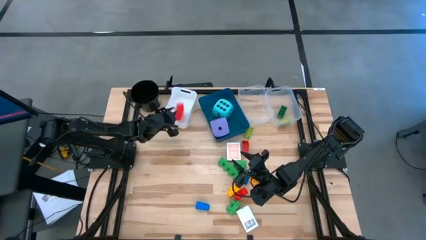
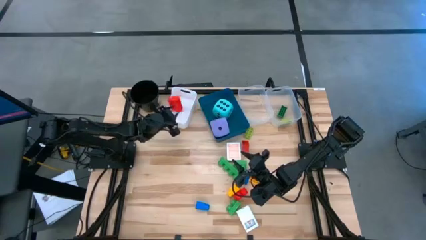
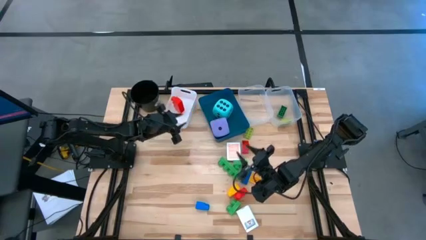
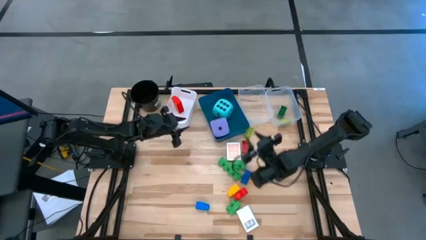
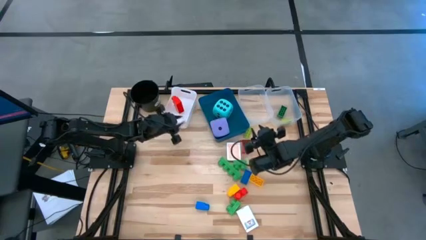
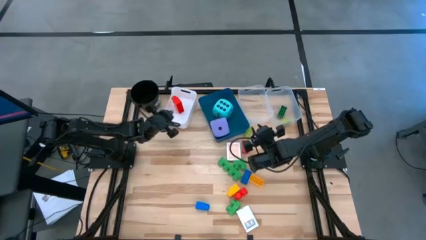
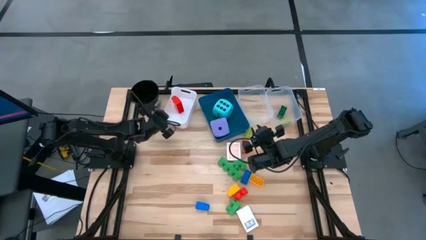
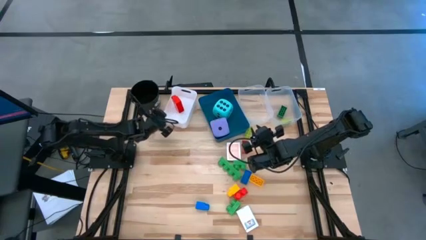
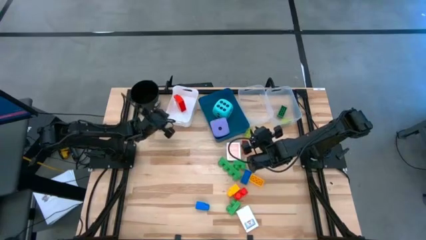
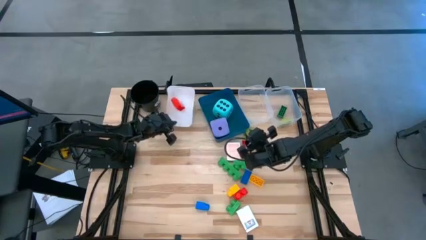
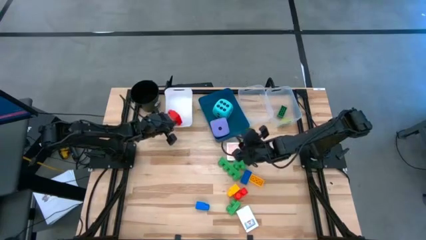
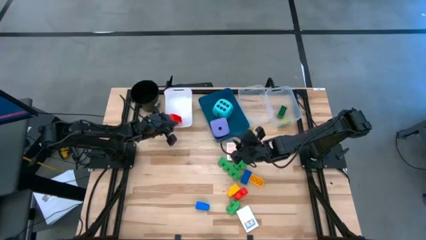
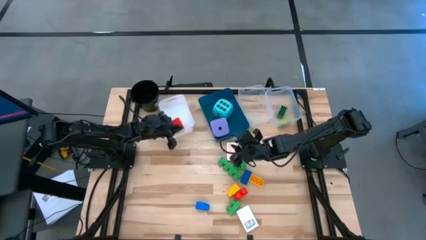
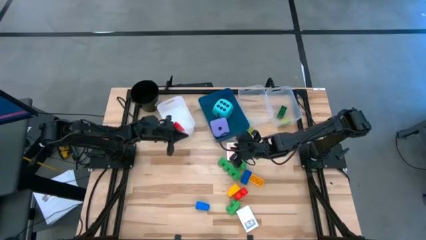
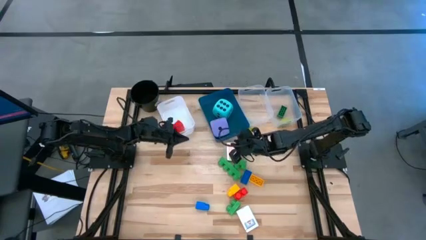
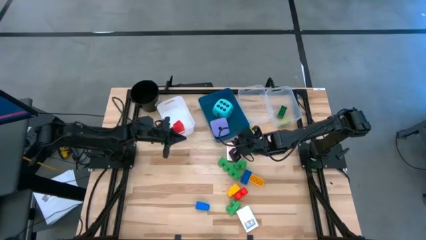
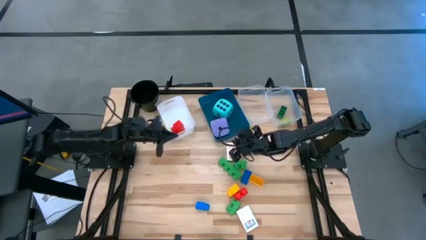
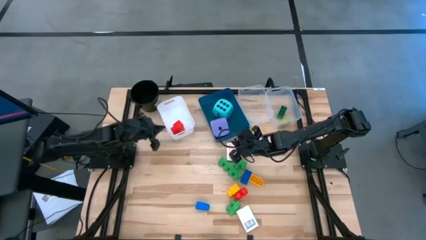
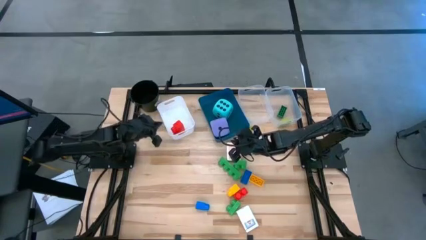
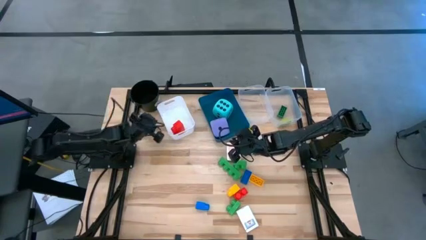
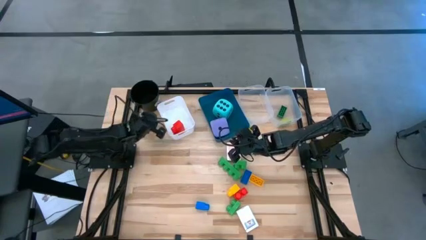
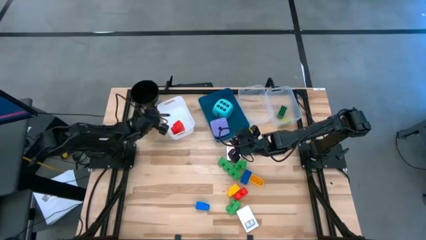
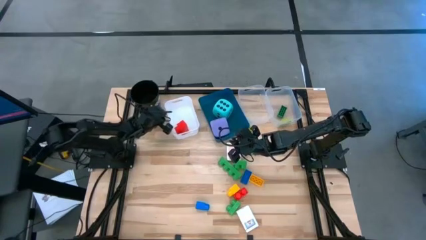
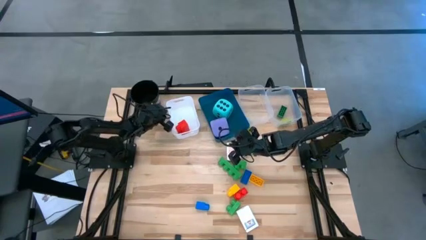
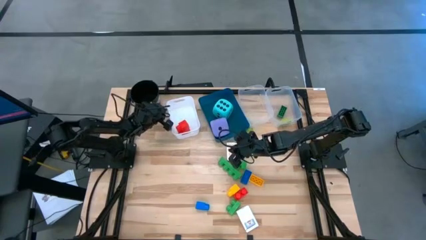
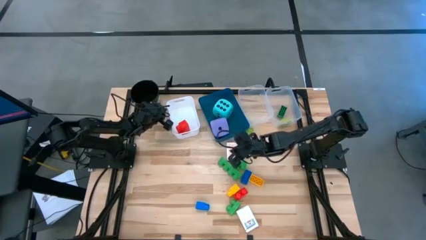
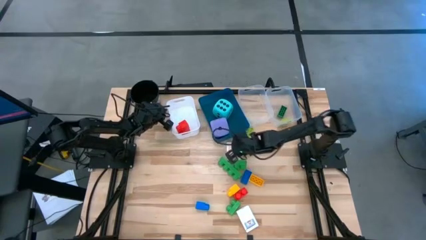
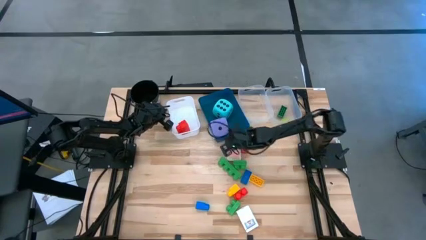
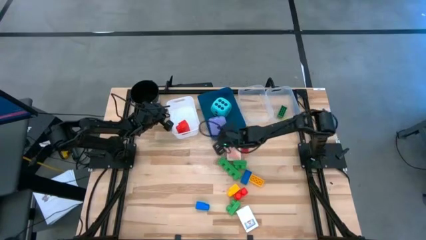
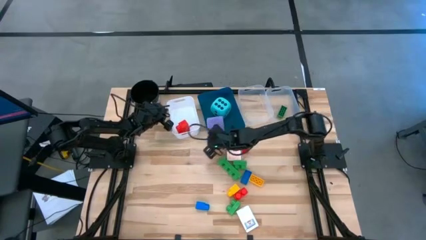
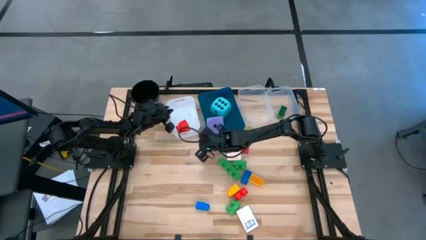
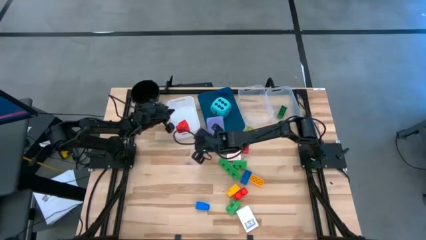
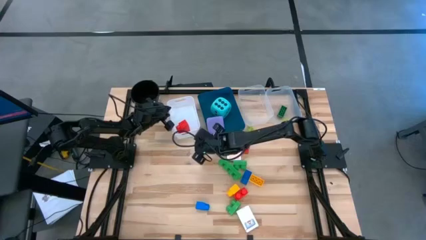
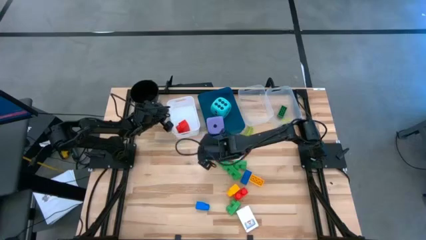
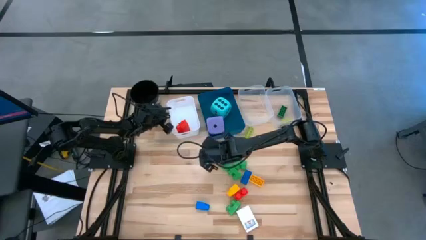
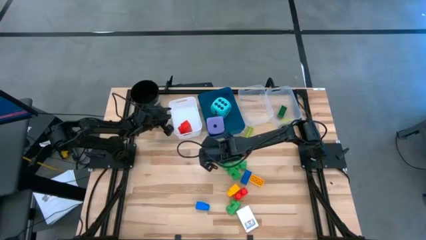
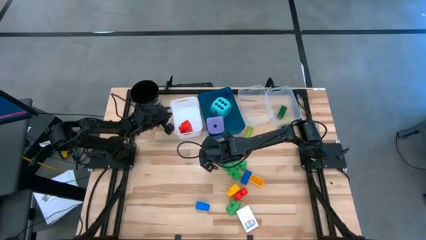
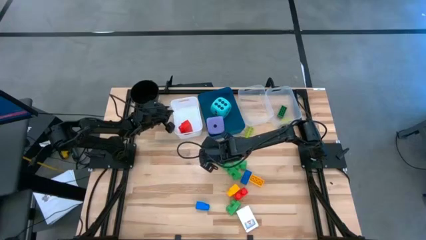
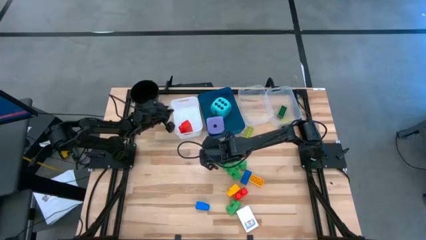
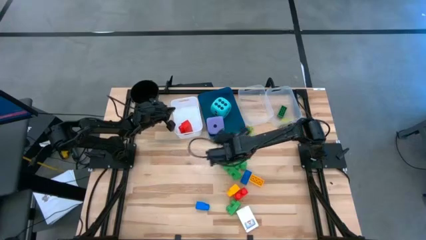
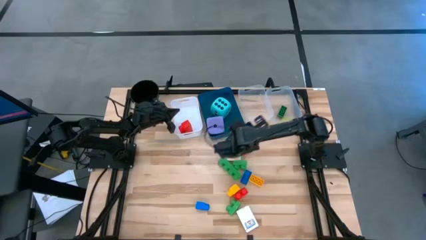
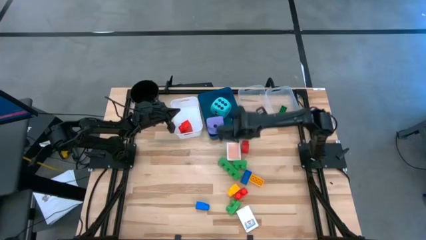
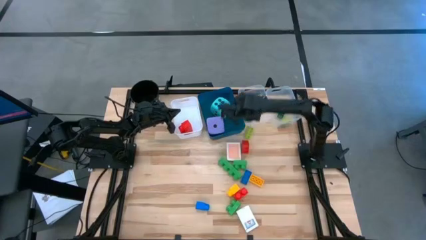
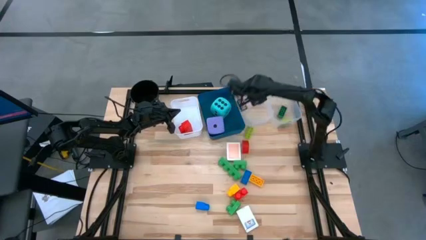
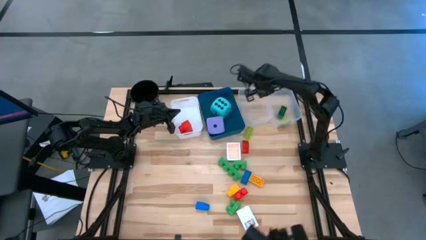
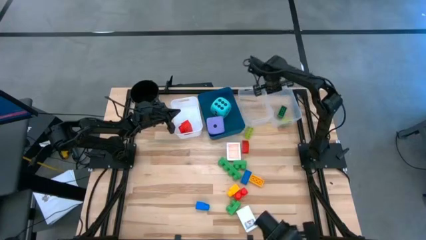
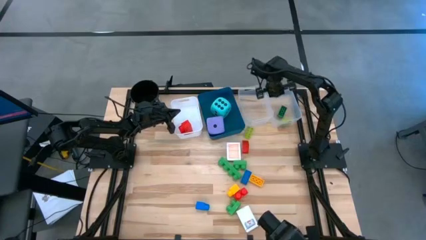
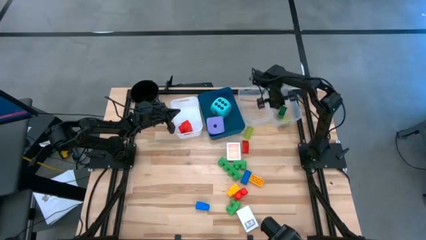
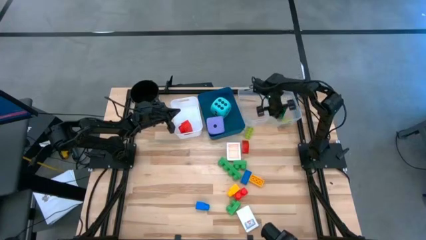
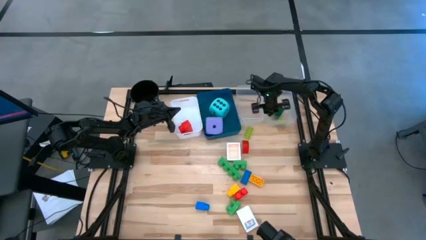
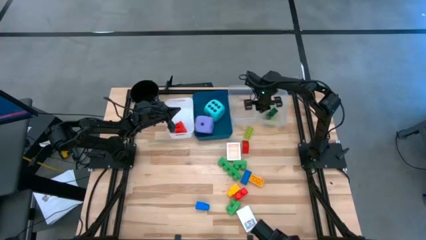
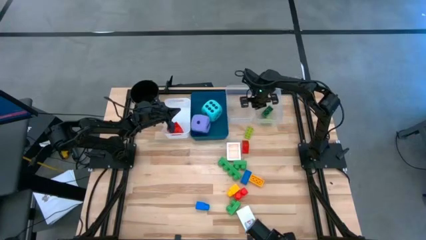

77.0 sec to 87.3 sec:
Task: Pick & Place Toys
Adjust the bins

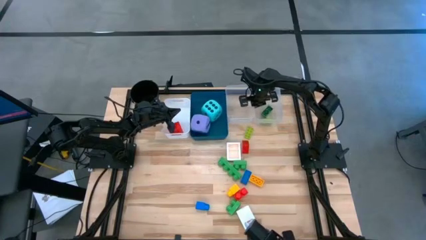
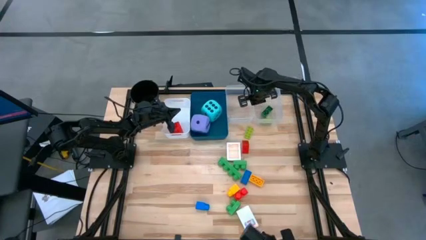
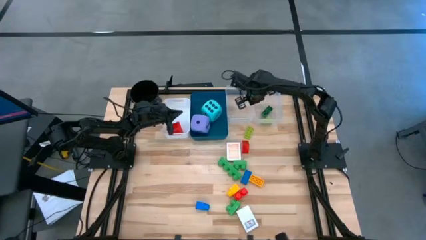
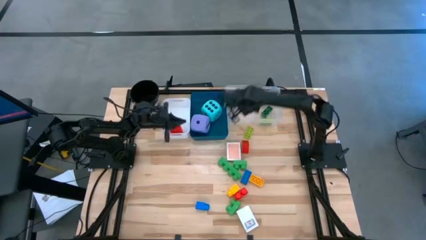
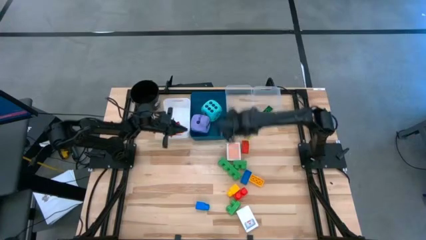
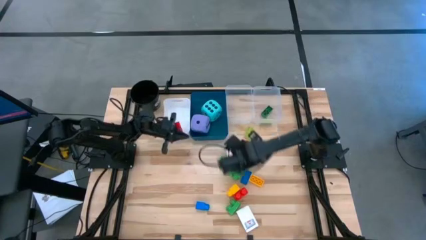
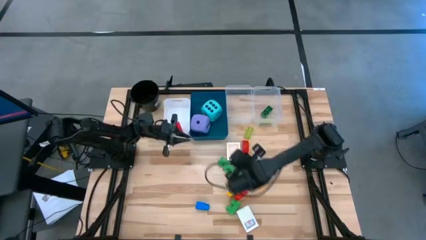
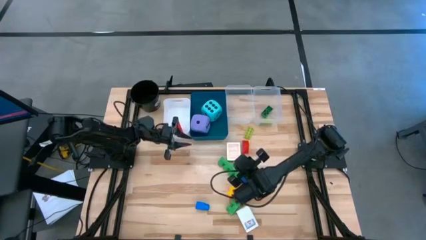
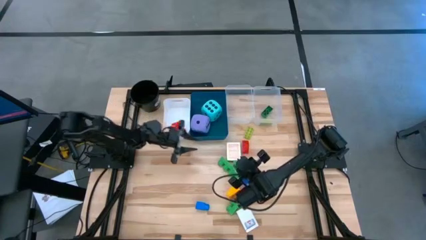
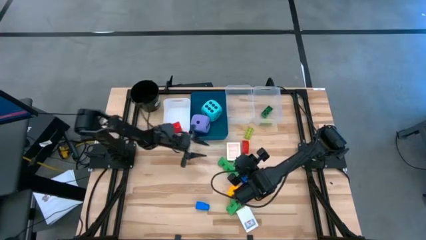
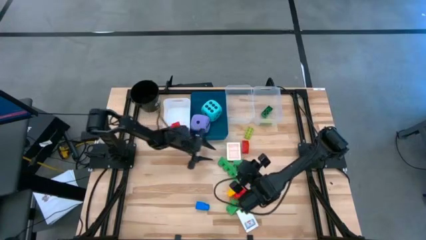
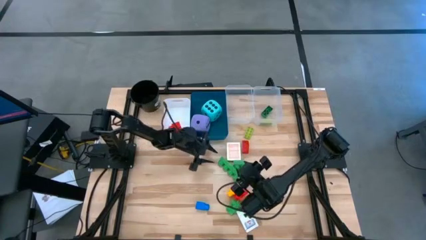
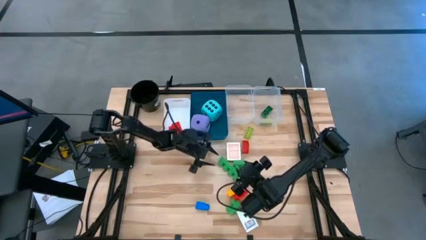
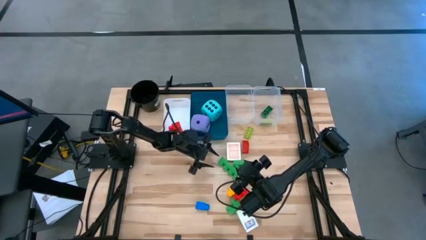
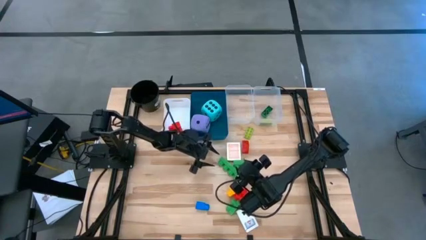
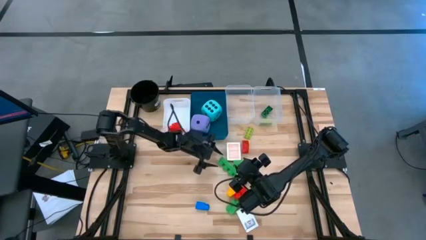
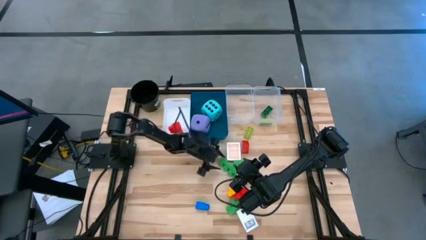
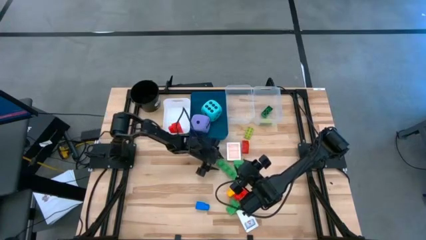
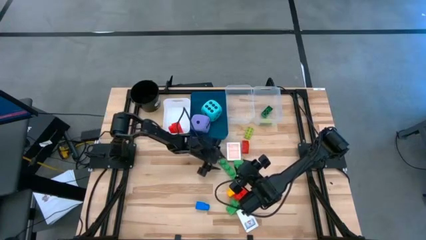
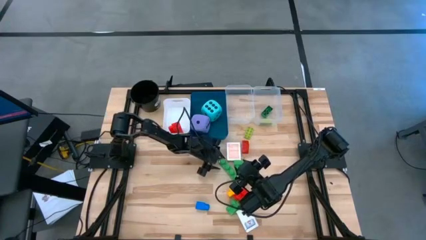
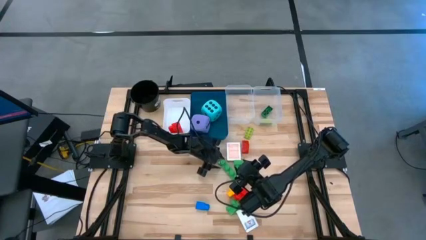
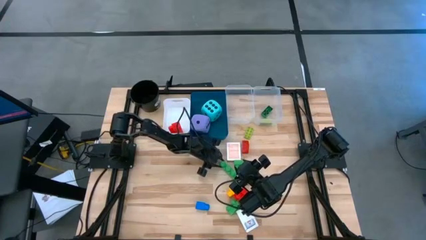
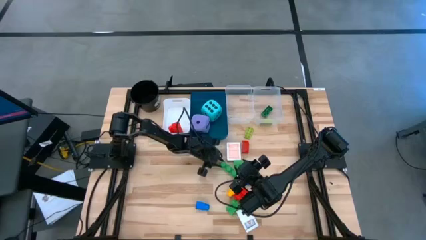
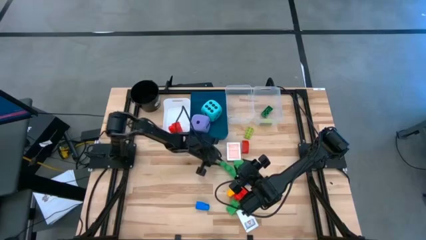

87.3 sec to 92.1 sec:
Put the top left large green game piece into the white bin

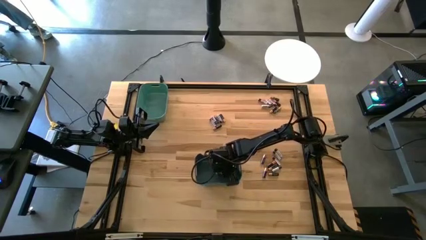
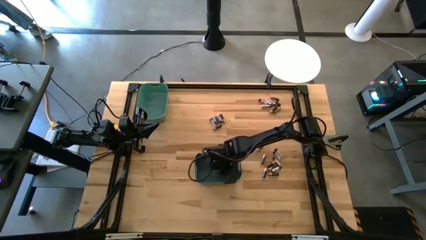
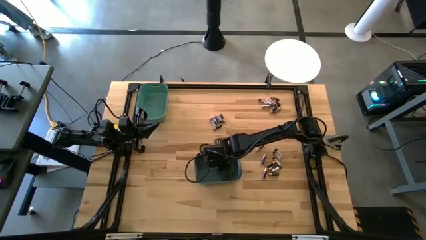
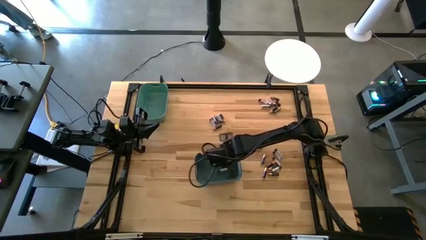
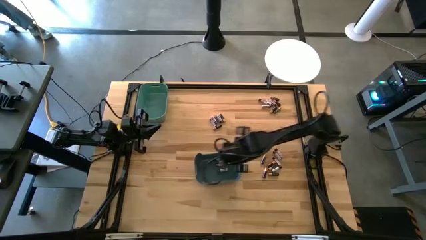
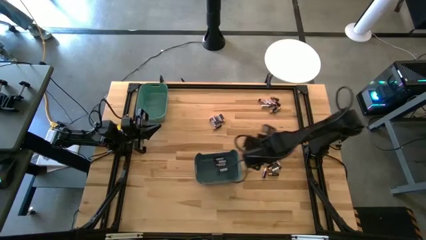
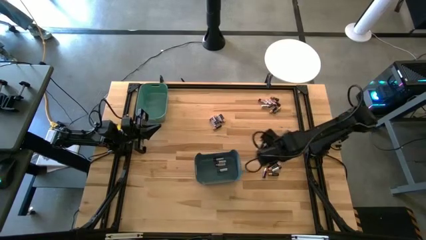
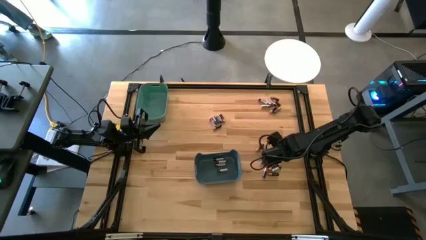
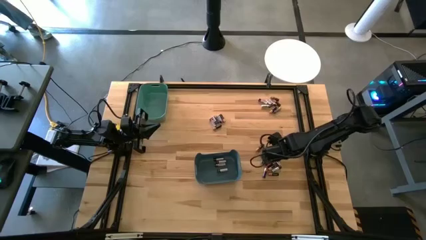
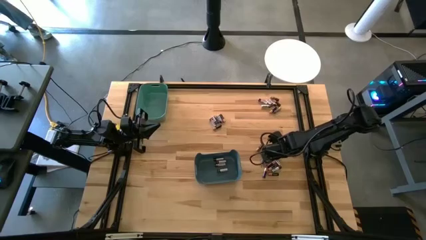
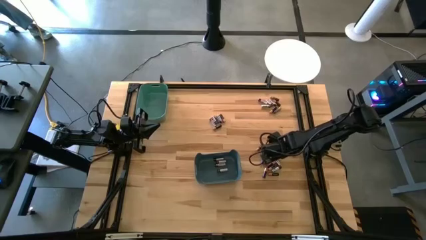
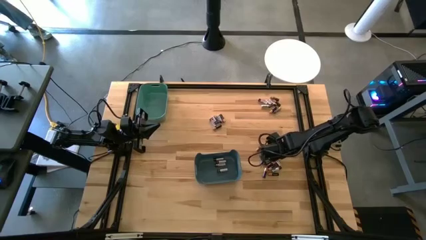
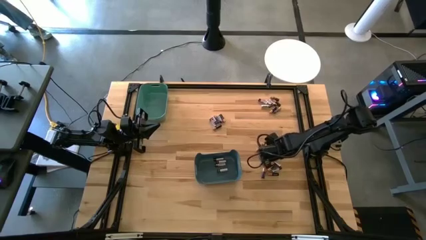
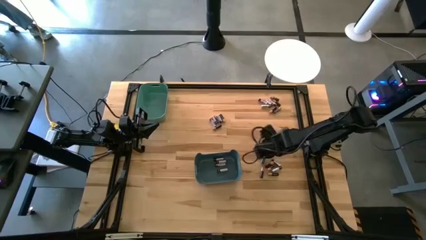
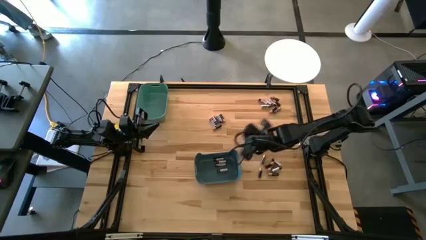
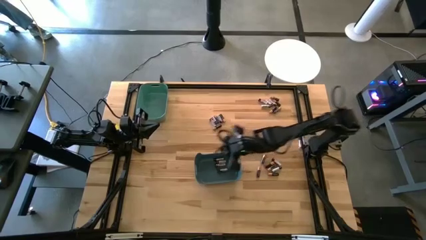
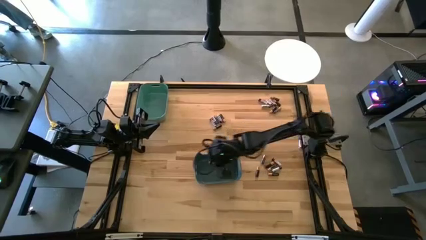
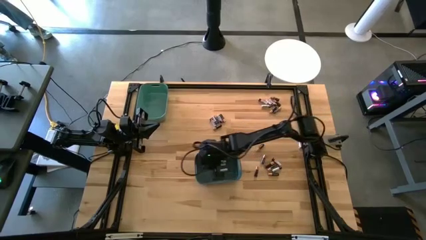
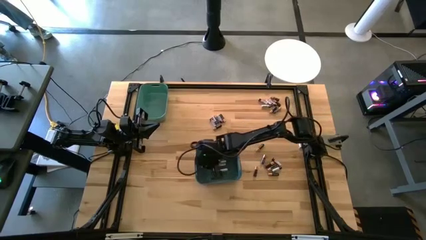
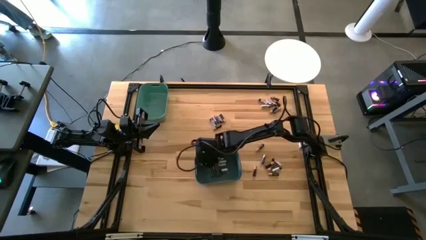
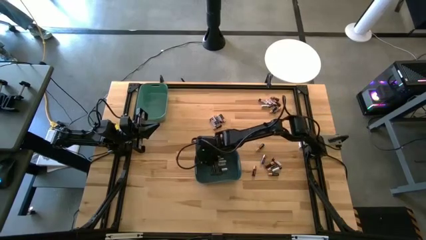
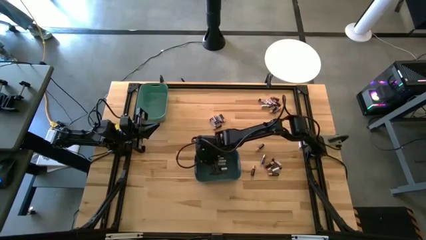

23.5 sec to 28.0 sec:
Task: Sort batteries
Put the silver battery into the blue bin
